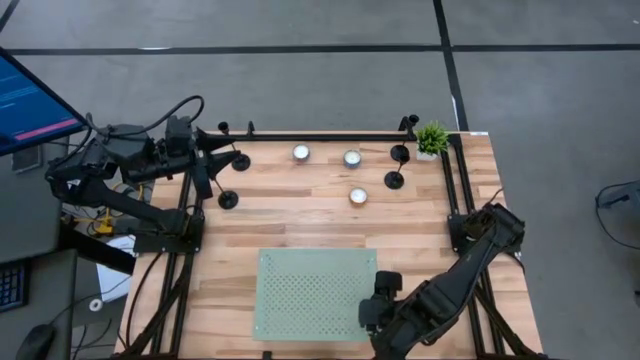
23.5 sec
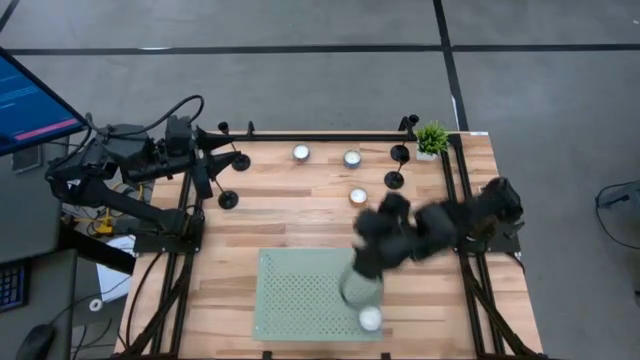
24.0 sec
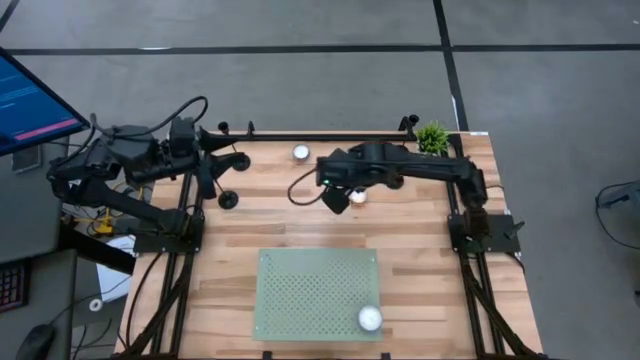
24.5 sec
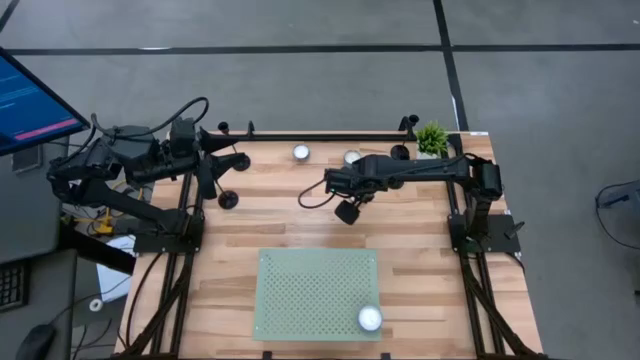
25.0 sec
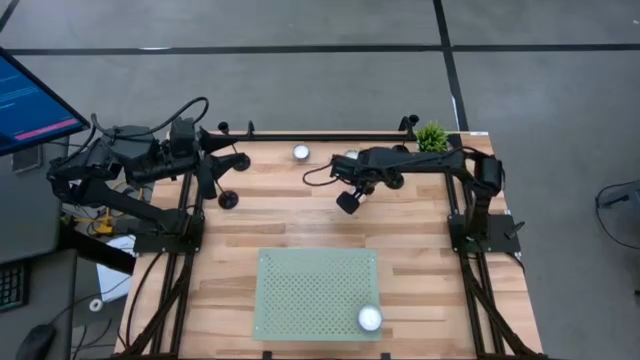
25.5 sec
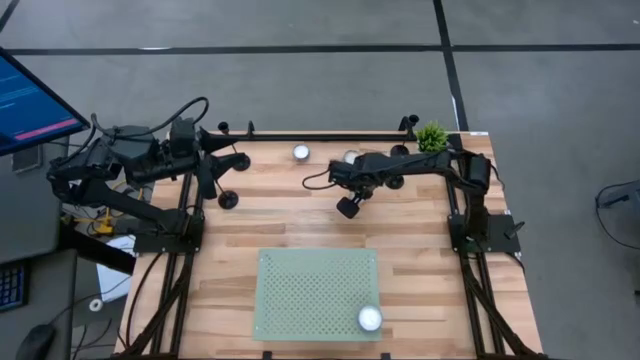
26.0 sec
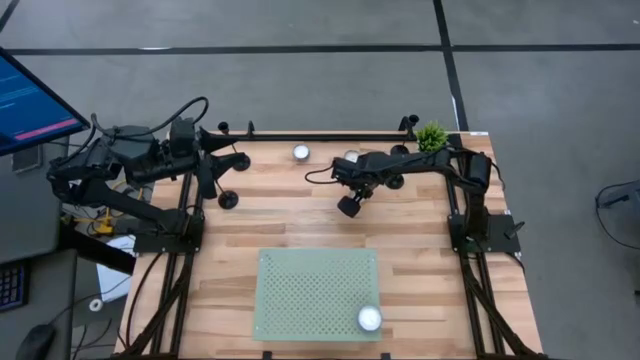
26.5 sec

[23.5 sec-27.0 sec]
Task: Stock candles on shelf
Put the orange scented candle on the shelf

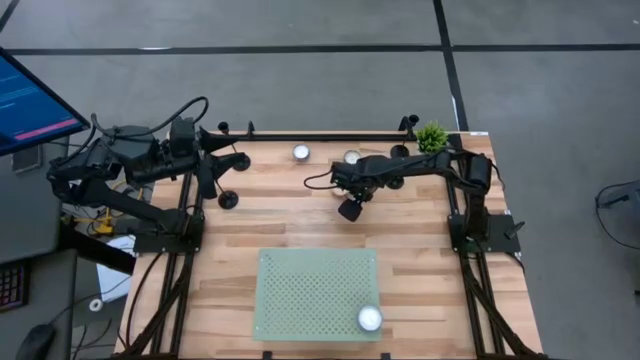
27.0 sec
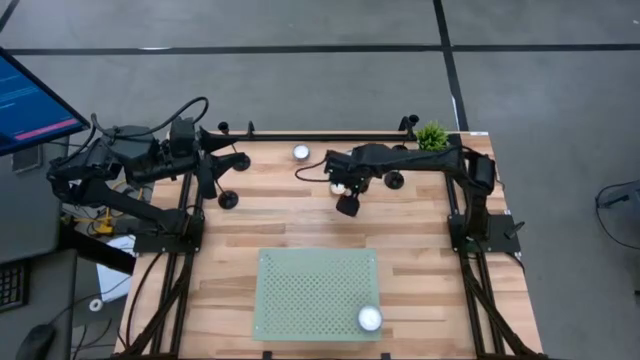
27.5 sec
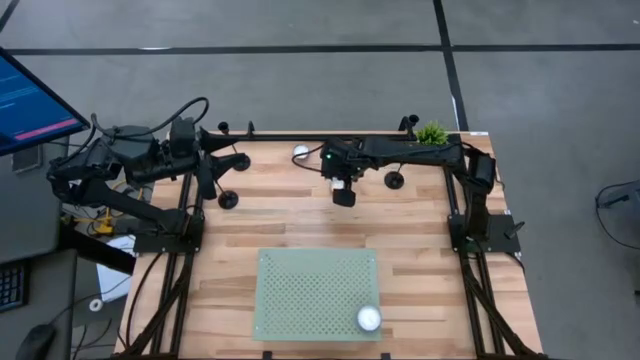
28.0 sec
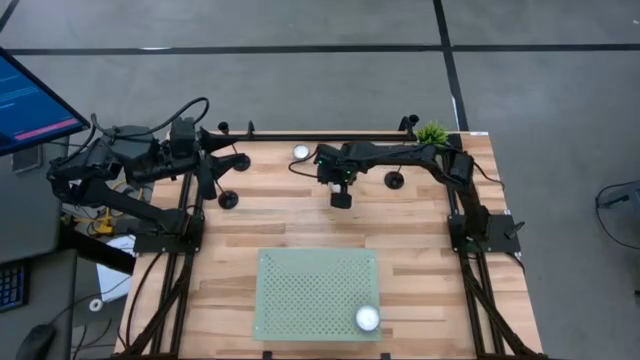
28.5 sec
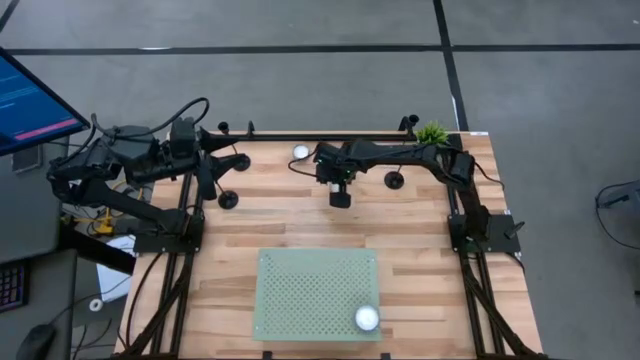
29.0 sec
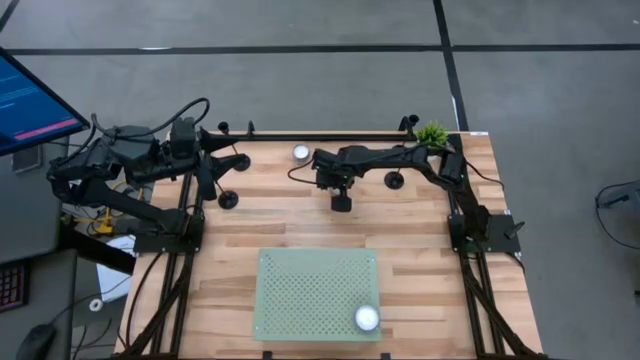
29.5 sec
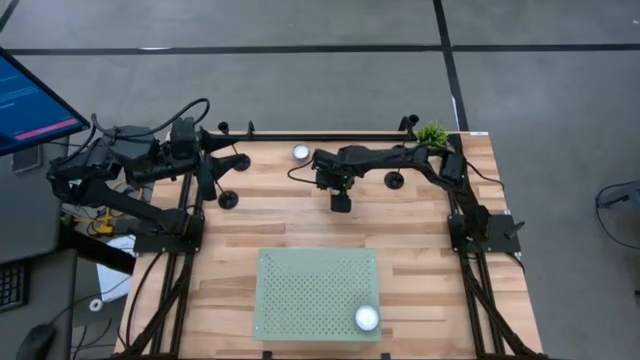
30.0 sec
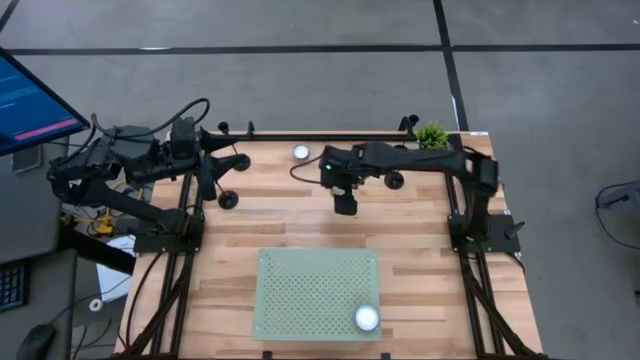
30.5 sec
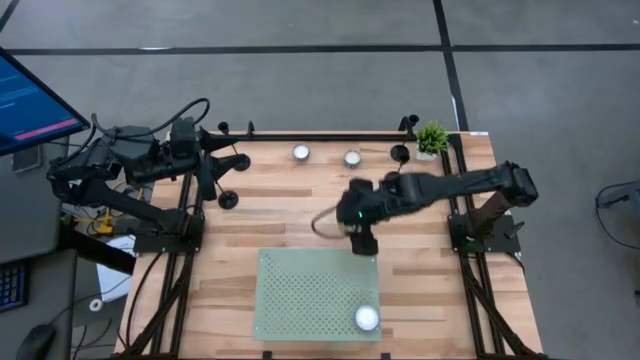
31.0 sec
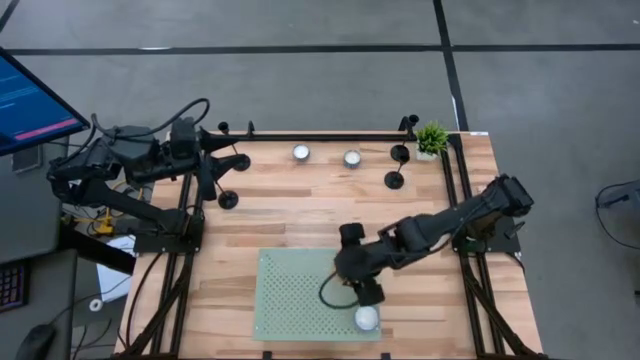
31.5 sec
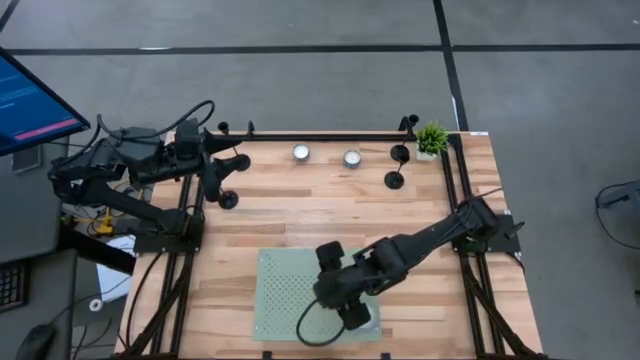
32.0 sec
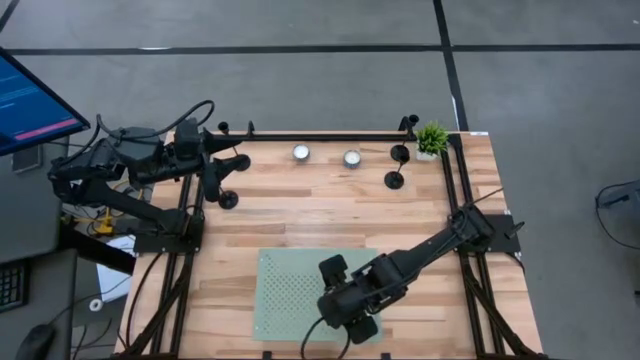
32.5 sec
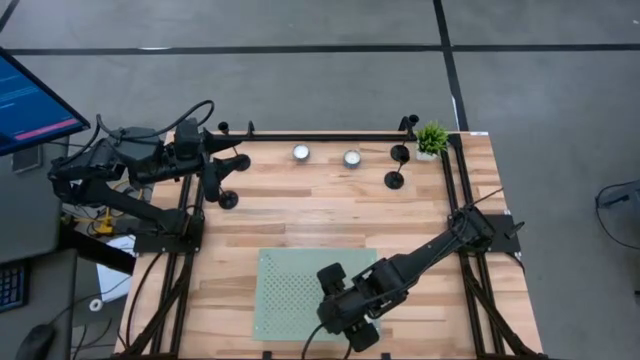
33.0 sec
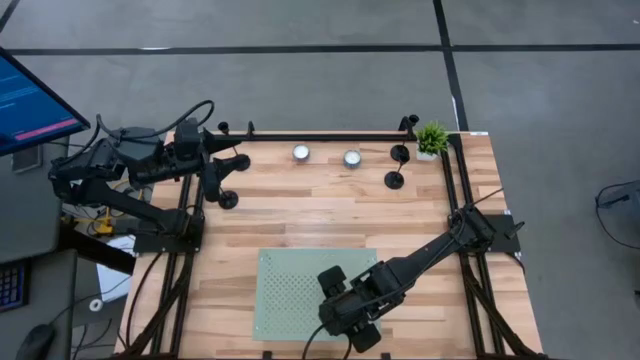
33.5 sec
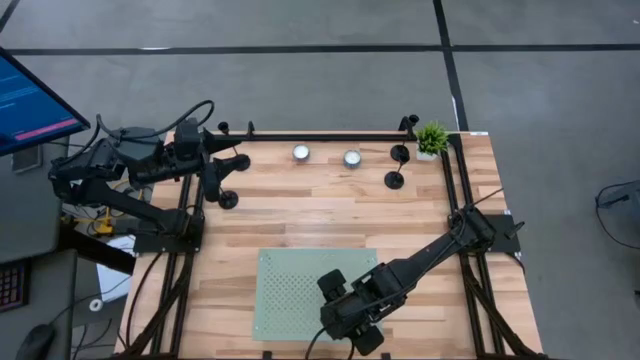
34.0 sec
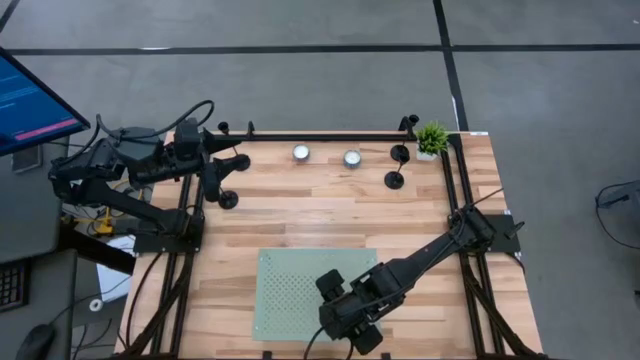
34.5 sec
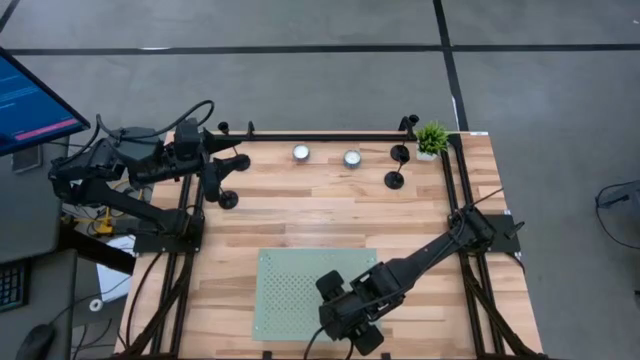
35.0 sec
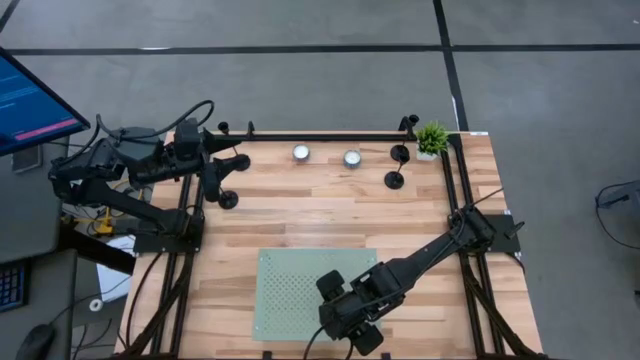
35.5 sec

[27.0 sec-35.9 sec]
Put the orange scented candle on the shelf

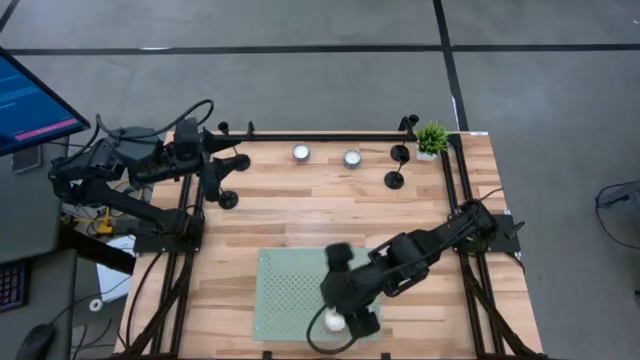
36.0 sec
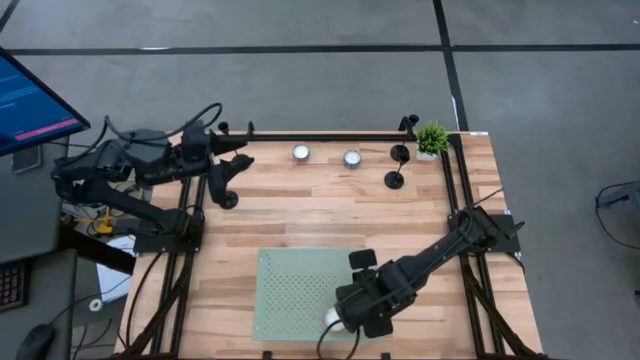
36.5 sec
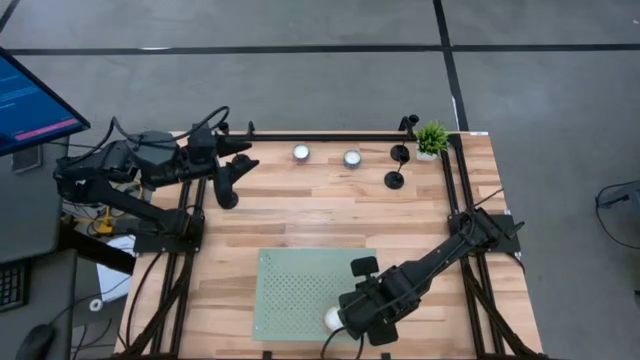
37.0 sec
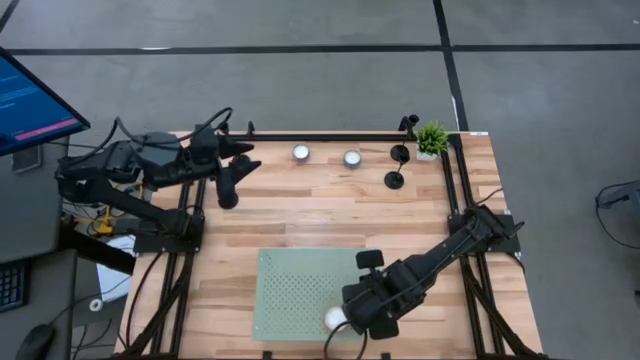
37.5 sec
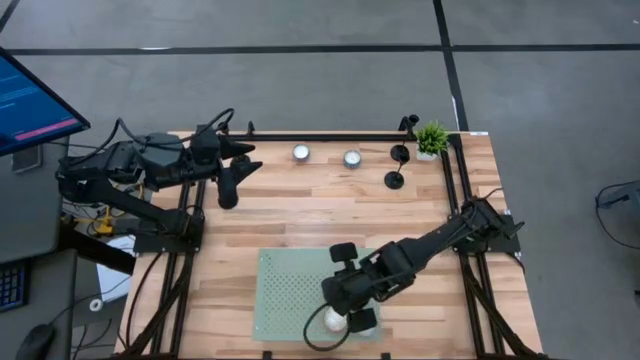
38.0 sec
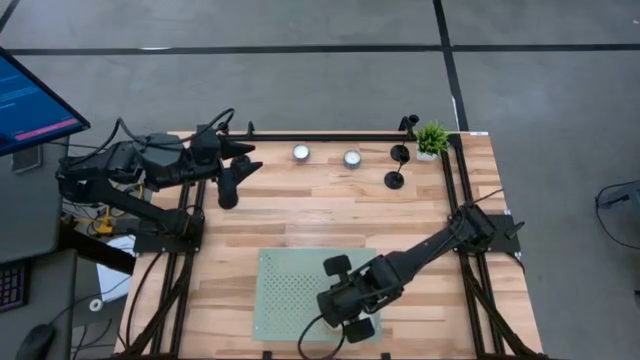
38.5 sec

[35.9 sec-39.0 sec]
Adjust the scented candles

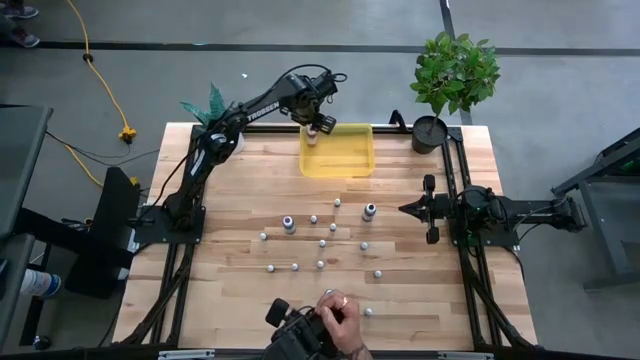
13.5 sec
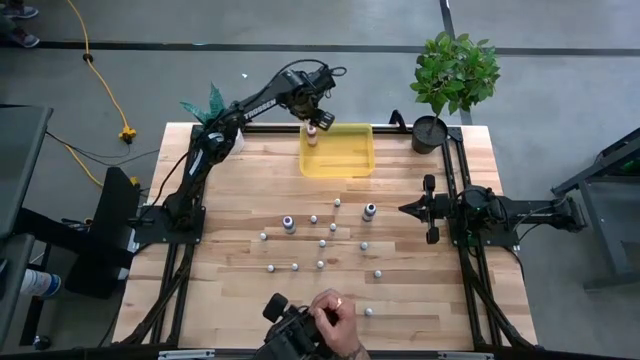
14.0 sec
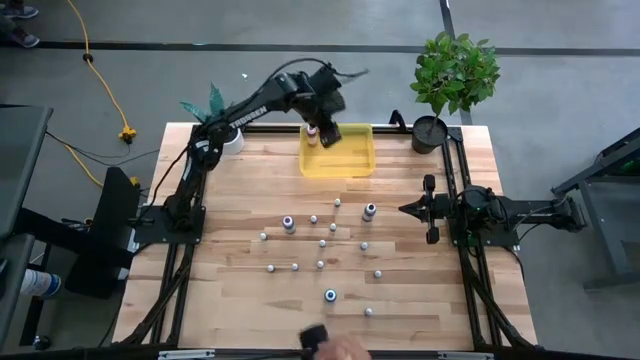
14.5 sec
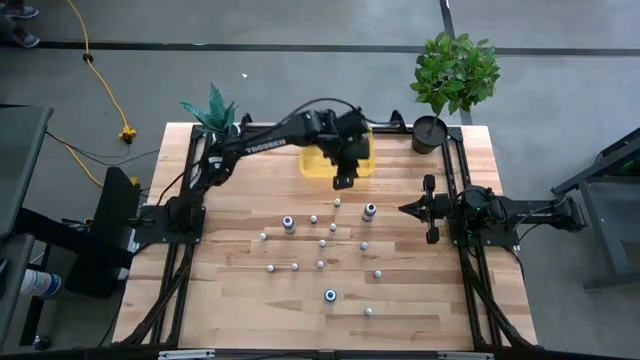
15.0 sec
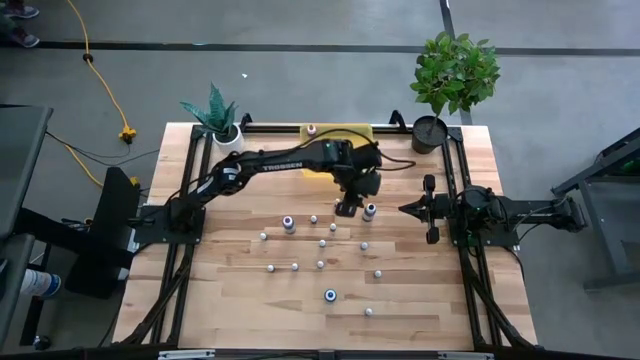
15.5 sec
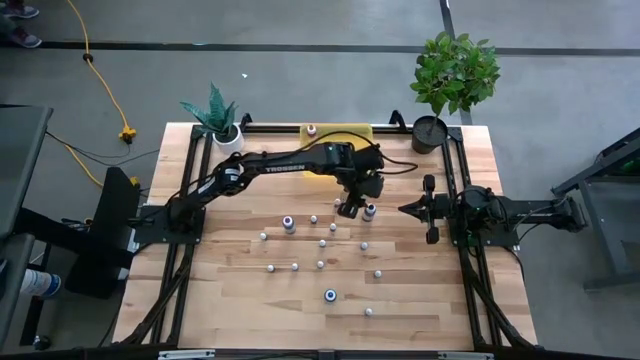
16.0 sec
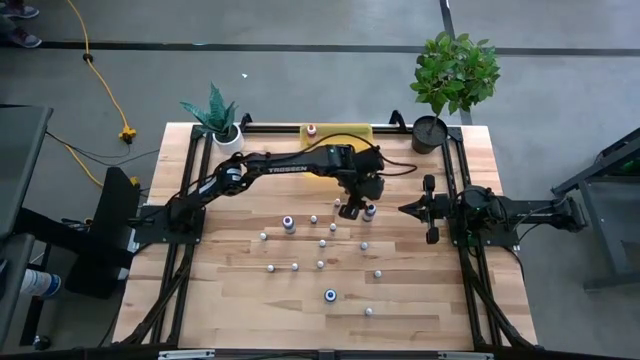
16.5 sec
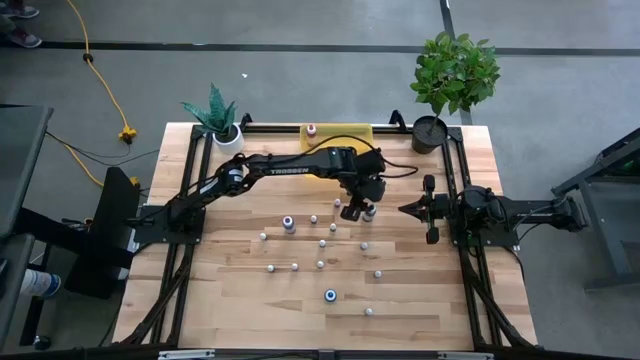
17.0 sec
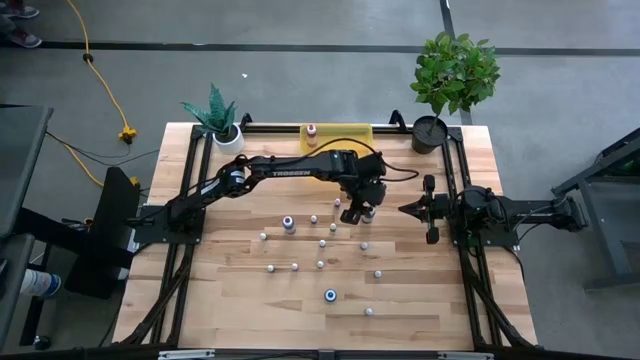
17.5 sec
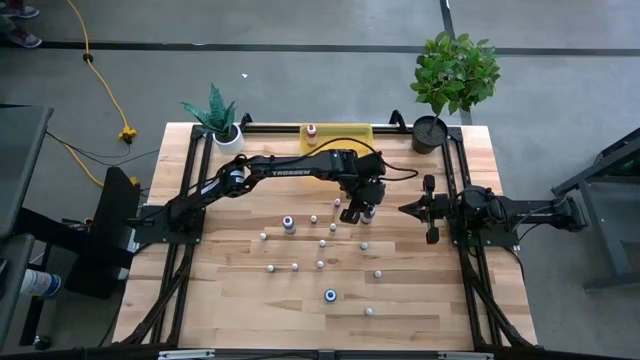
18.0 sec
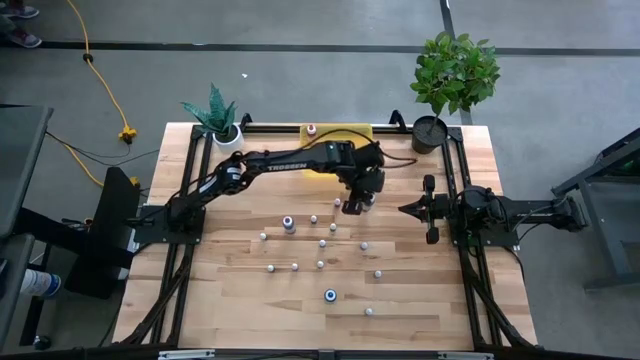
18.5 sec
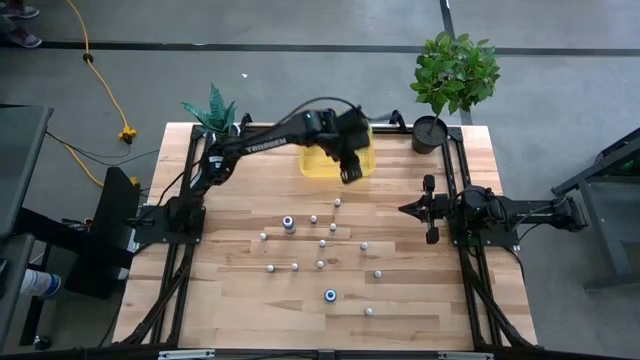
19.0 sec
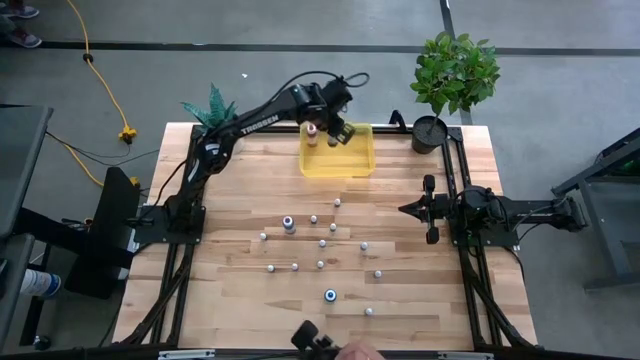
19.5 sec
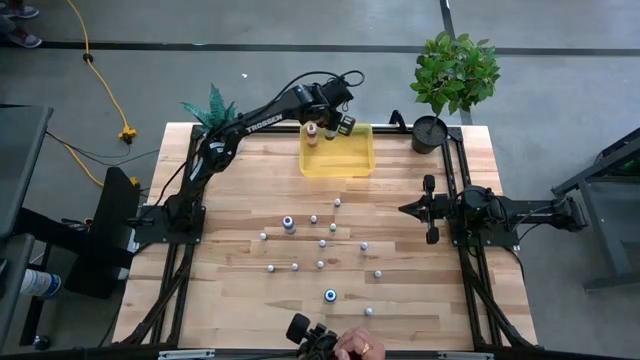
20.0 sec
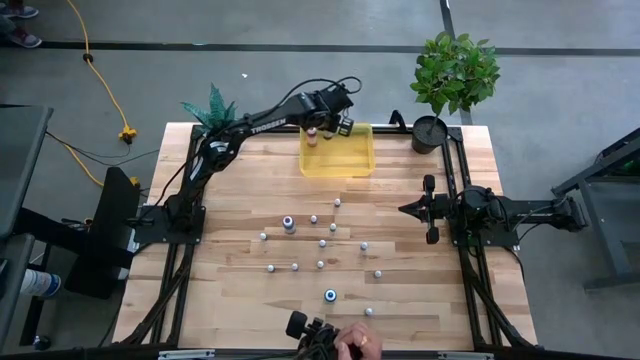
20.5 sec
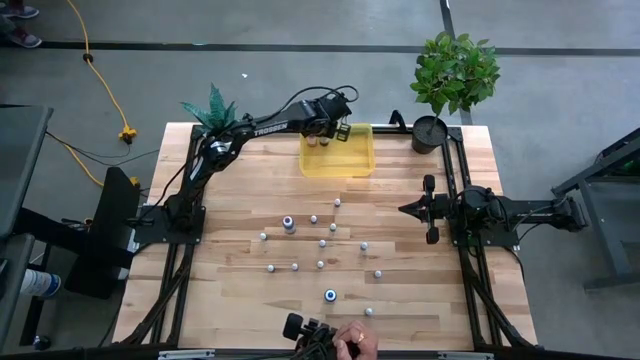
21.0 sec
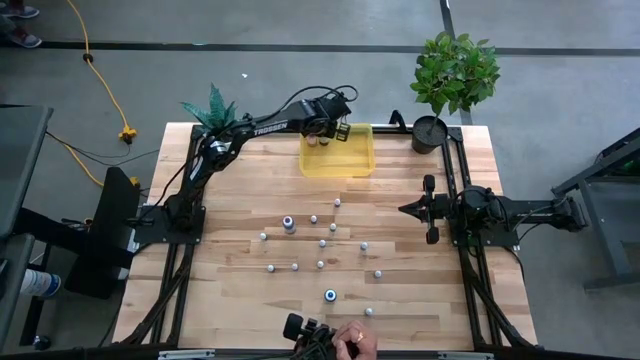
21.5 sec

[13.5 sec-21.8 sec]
Task: Pick & Place food coloring
Put the large black food coloring bottle into the yellow bin
